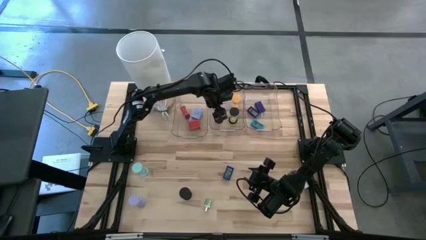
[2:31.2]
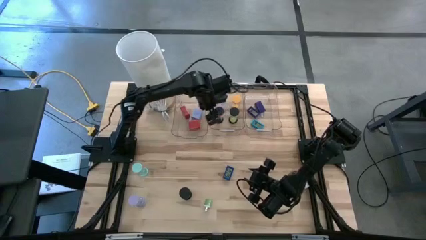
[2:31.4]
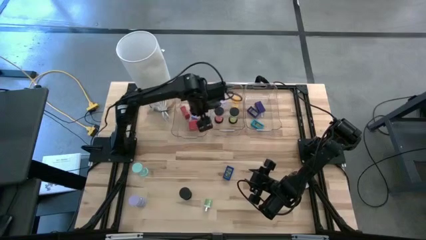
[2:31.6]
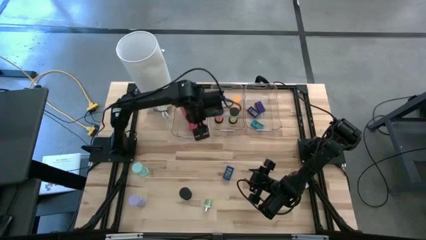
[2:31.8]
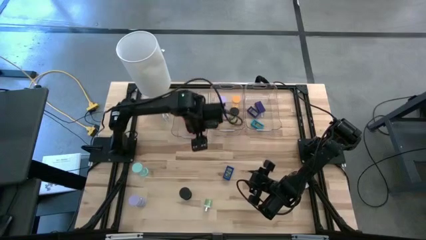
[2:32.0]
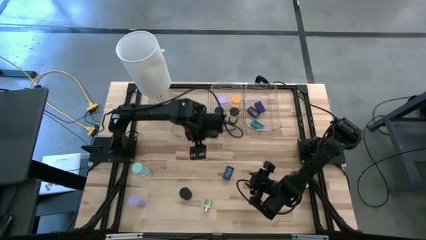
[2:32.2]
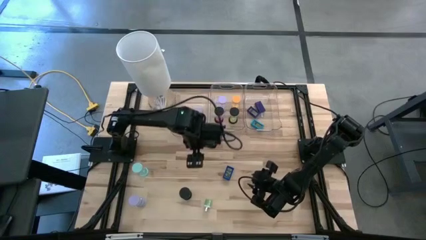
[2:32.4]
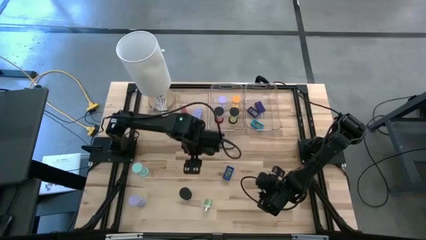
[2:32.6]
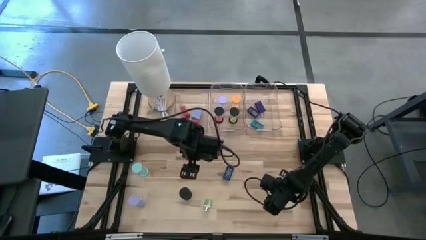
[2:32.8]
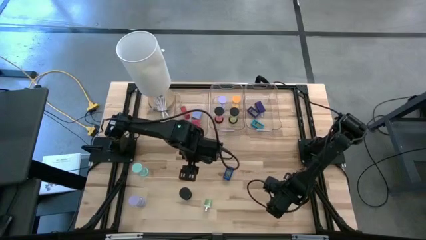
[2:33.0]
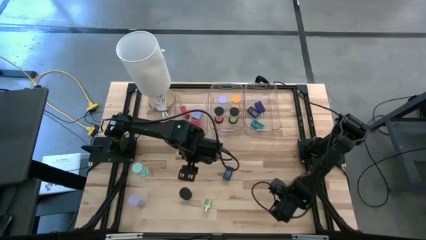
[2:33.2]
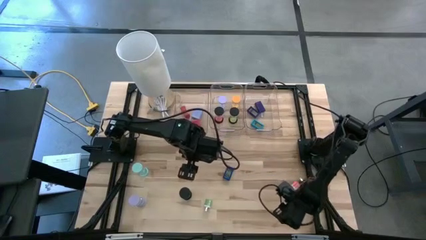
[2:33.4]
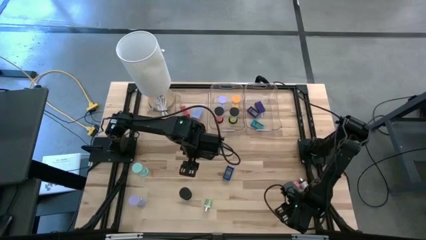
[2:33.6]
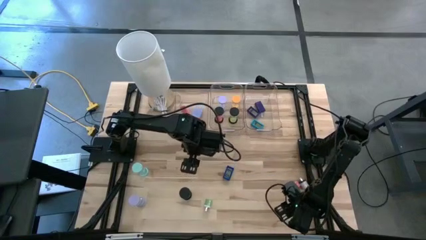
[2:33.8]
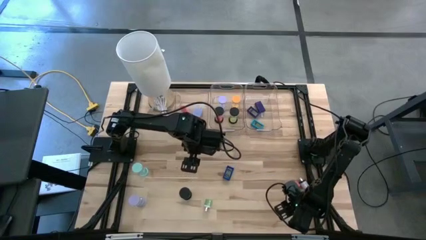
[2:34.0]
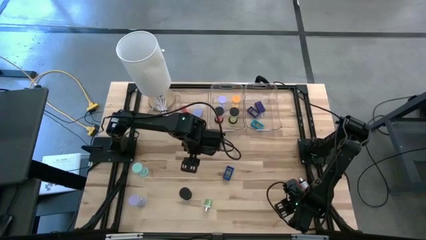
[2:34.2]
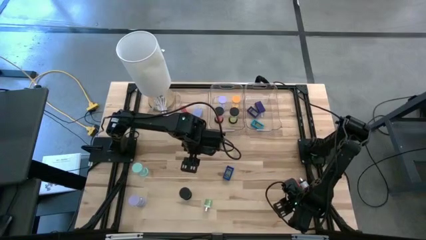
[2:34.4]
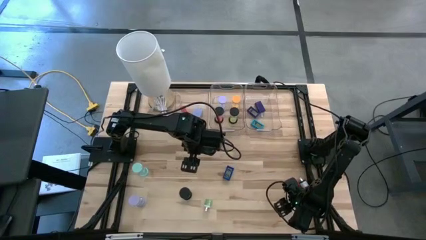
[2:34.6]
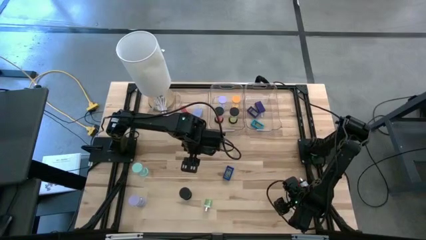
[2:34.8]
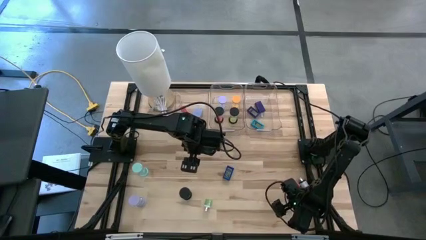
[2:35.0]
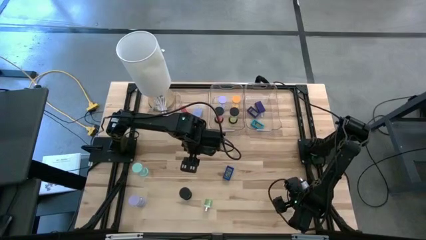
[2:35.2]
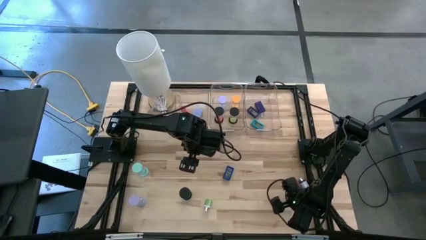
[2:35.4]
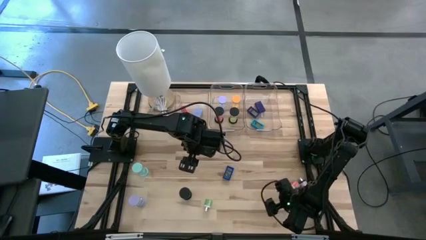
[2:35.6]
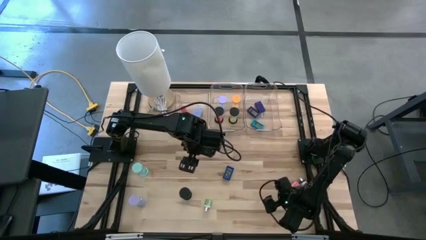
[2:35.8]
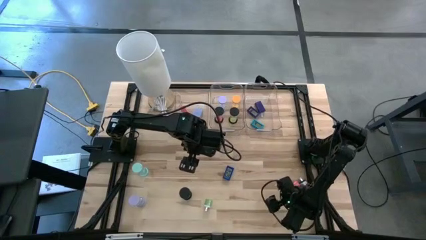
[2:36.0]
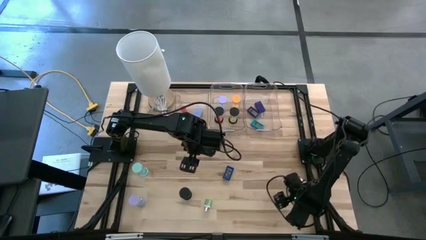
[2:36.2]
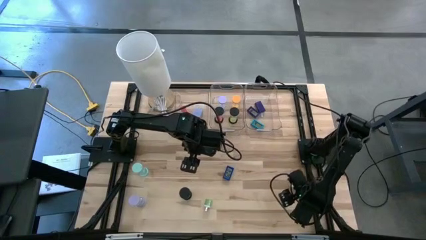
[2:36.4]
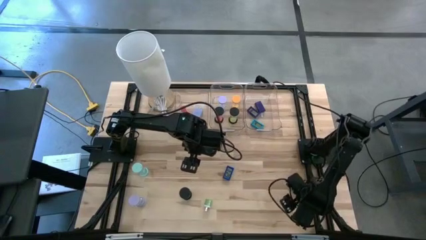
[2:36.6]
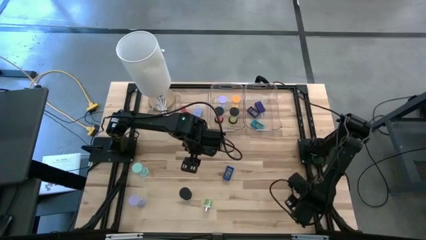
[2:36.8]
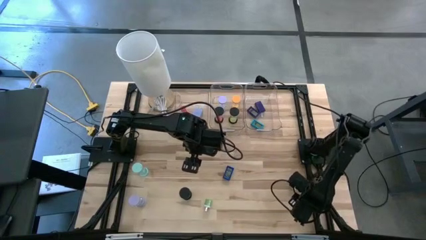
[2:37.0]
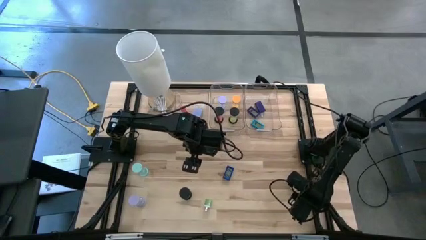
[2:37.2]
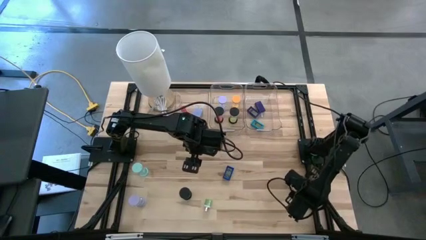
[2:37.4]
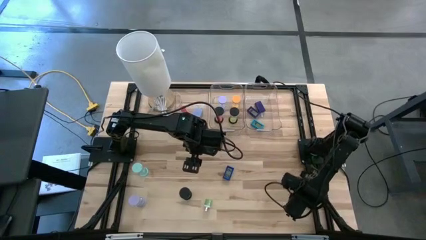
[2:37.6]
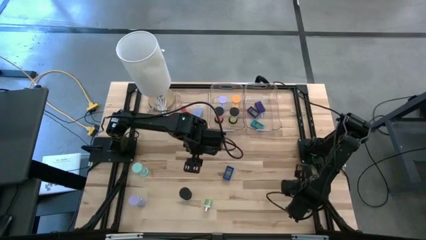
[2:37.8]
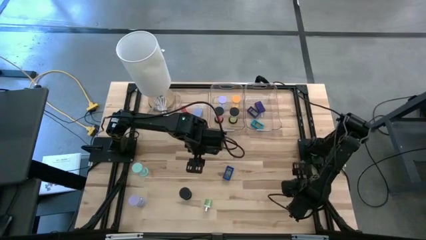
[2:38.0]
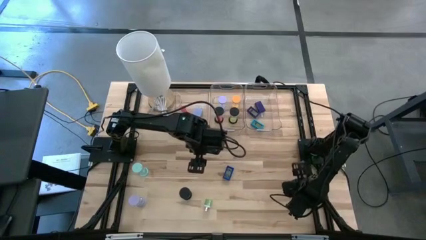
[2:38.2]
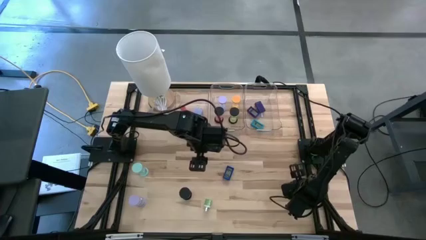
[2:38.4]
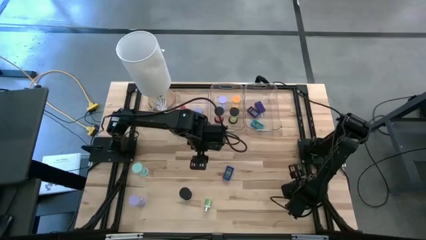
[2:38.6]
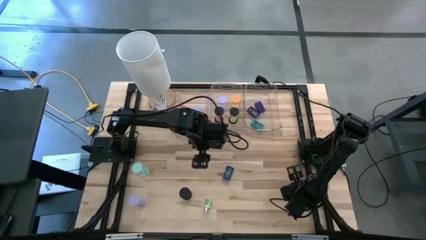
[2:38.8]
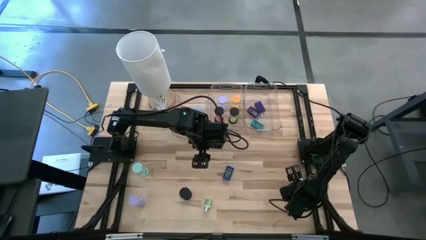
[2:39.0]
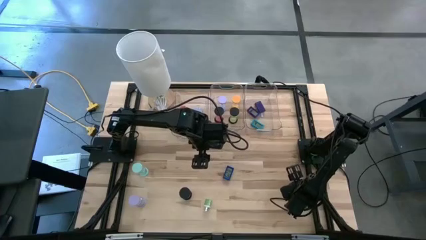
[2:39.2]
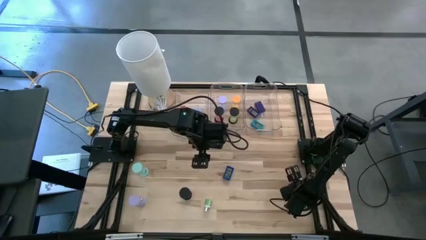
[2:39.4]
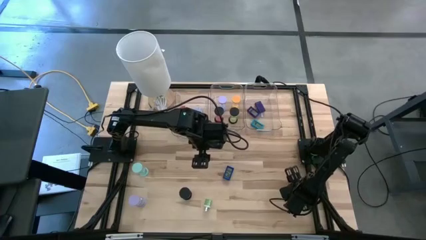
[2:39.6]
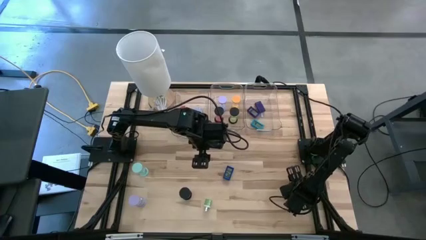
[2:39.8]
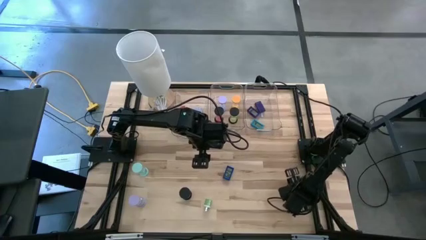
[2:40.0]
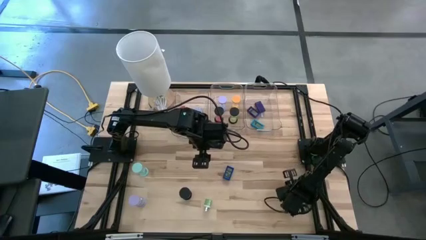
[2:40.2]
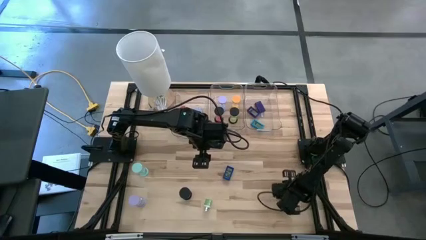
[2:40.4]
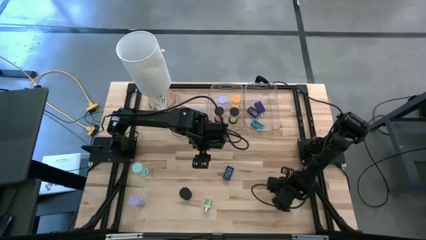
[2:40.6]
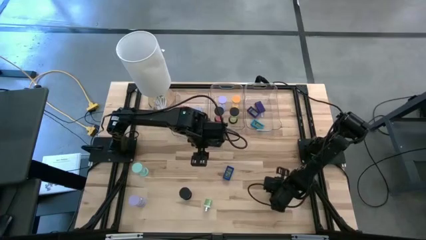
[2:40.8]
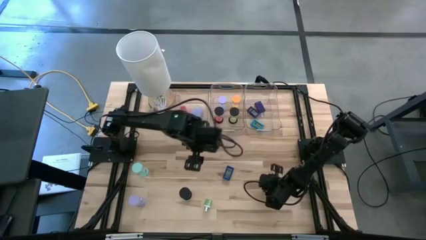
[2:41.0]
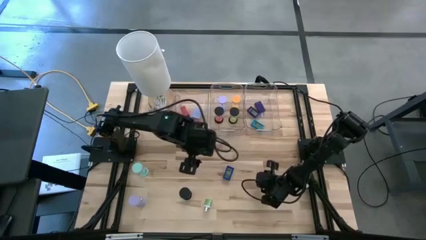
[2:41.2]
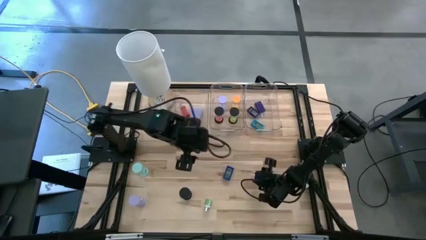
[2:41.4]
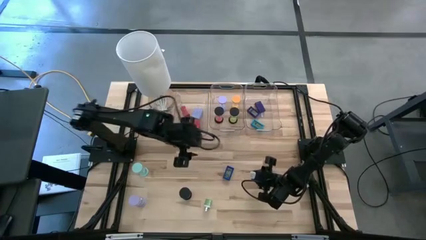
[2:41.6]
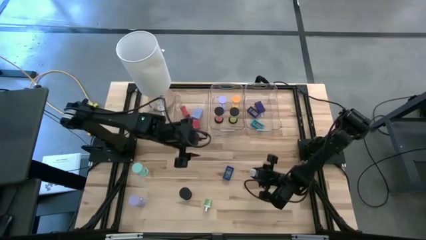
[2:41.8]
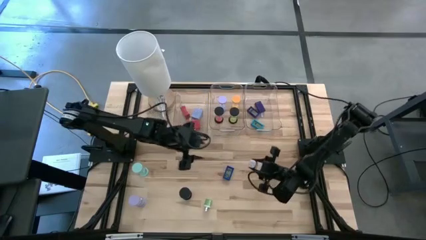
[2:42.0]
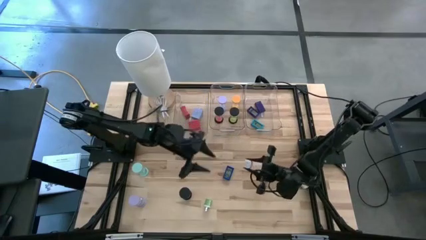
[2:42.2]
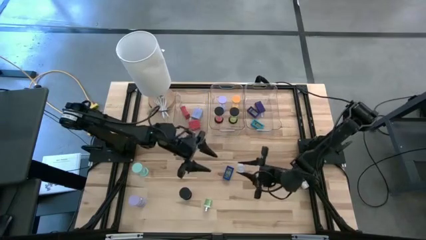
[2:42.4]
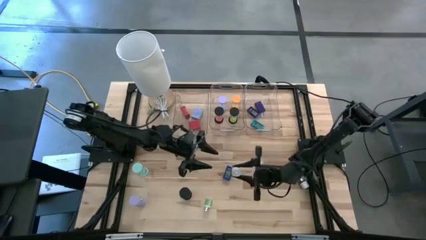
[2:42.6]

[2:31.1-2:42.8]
Task: Pick & Place Office items
Put the pink charger adapter into the left transparent bin
